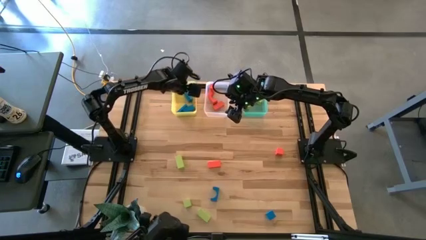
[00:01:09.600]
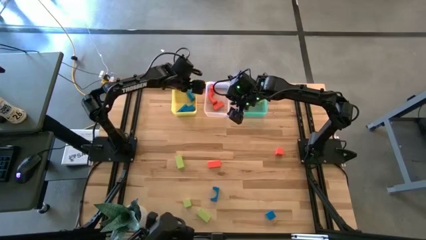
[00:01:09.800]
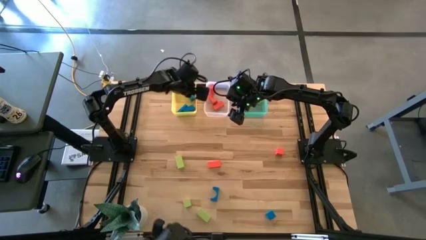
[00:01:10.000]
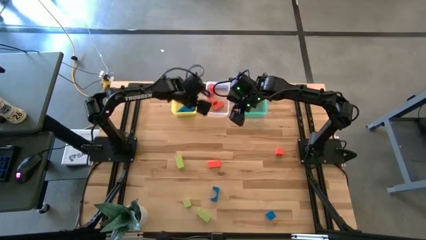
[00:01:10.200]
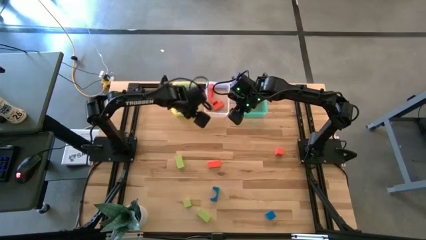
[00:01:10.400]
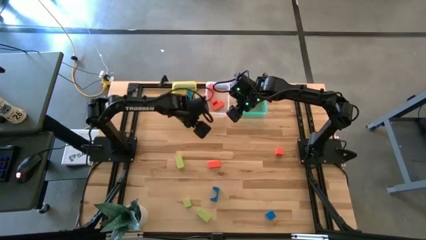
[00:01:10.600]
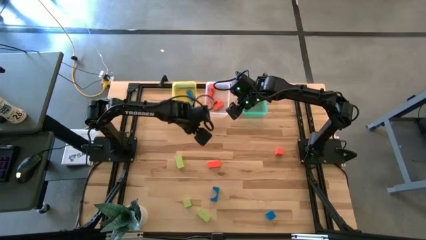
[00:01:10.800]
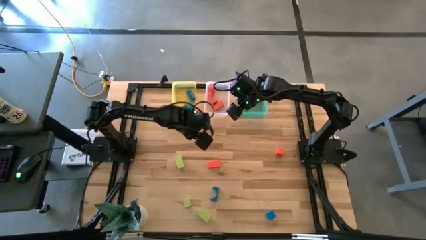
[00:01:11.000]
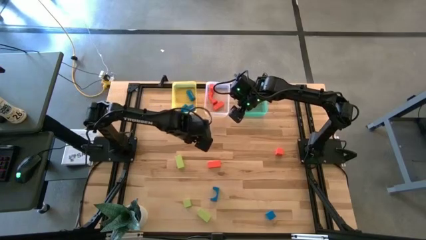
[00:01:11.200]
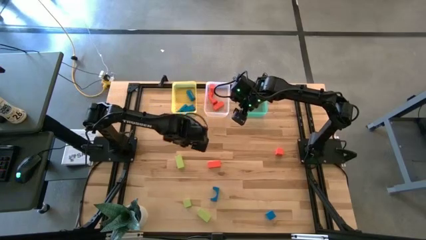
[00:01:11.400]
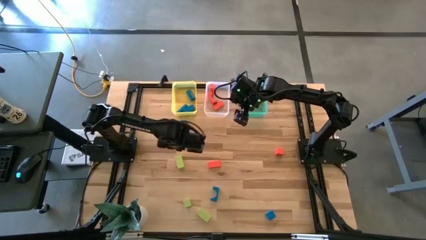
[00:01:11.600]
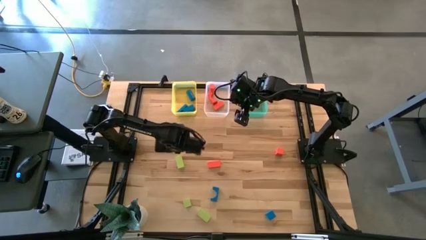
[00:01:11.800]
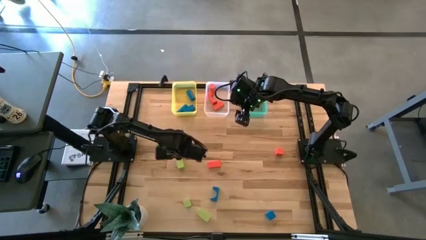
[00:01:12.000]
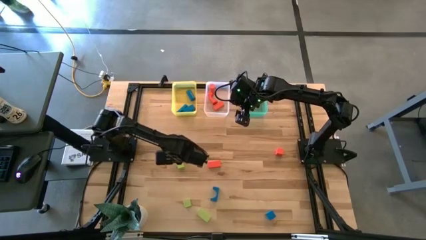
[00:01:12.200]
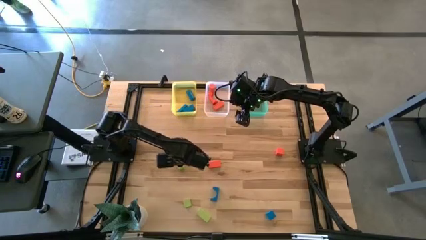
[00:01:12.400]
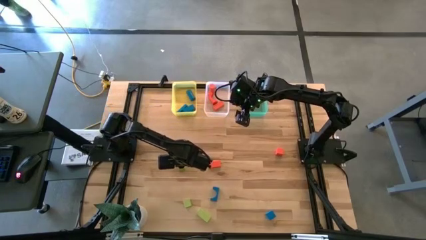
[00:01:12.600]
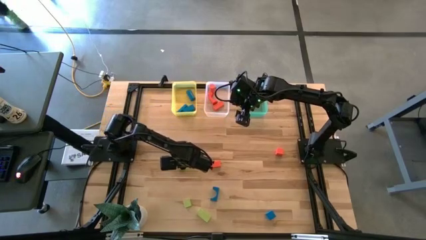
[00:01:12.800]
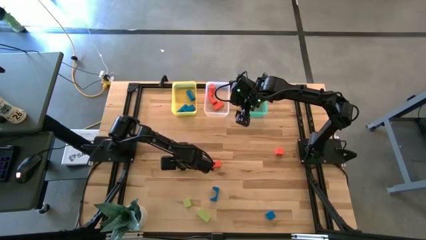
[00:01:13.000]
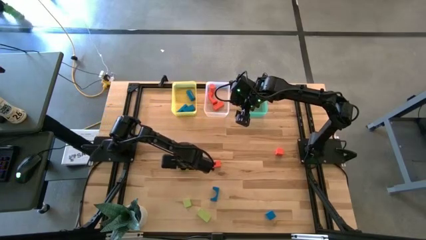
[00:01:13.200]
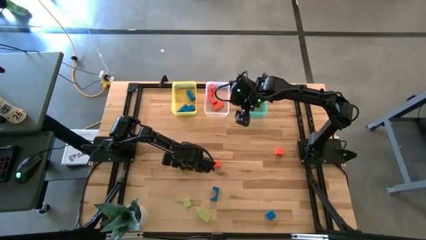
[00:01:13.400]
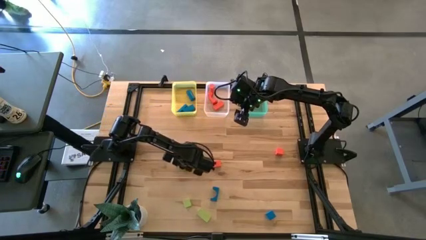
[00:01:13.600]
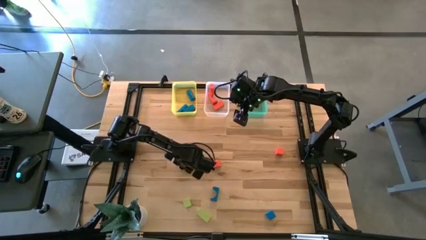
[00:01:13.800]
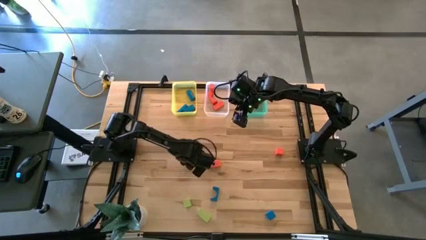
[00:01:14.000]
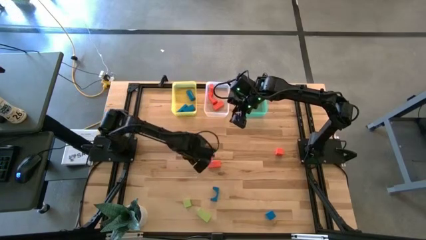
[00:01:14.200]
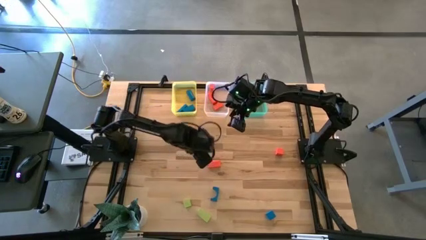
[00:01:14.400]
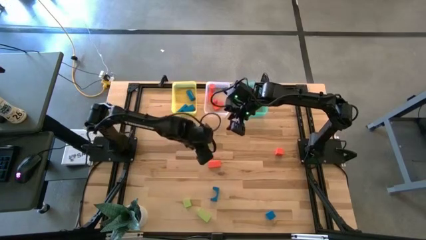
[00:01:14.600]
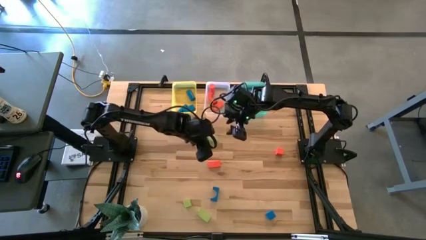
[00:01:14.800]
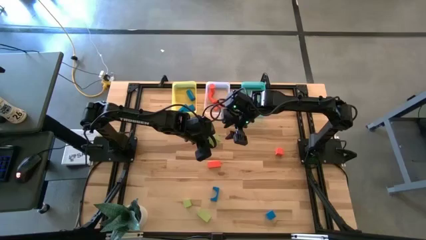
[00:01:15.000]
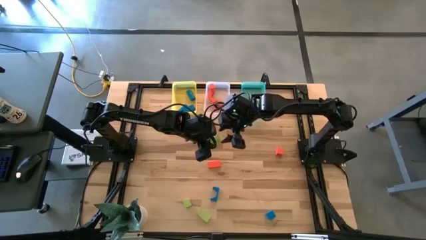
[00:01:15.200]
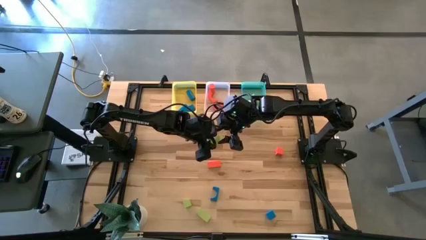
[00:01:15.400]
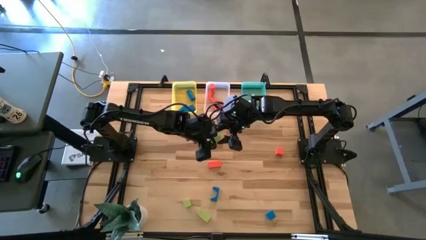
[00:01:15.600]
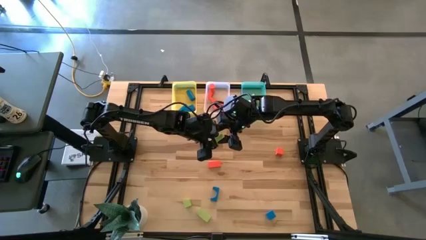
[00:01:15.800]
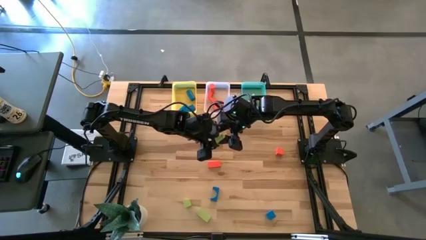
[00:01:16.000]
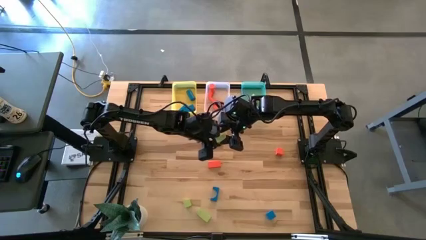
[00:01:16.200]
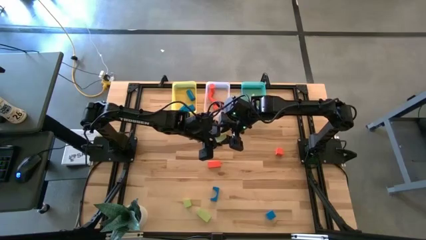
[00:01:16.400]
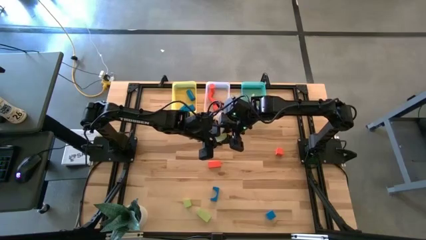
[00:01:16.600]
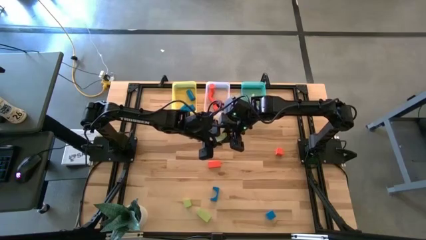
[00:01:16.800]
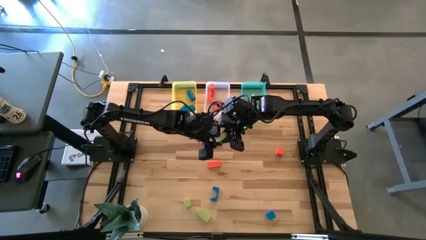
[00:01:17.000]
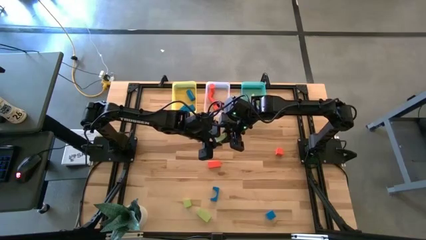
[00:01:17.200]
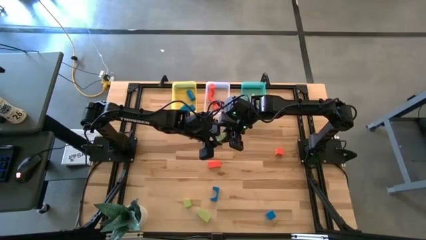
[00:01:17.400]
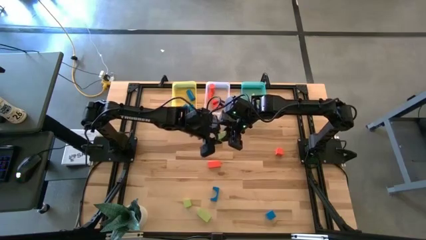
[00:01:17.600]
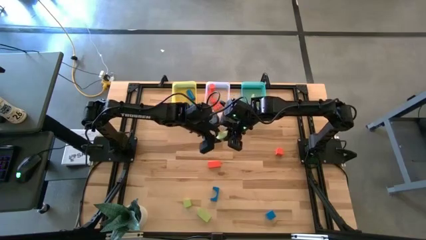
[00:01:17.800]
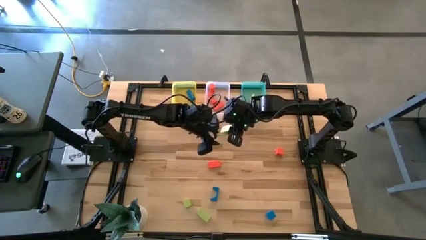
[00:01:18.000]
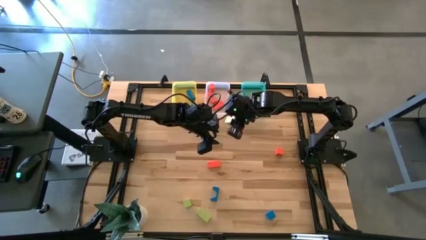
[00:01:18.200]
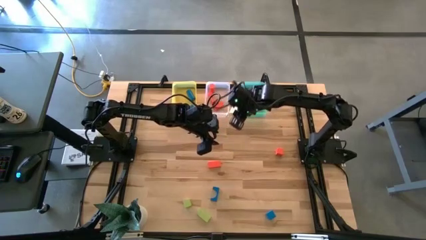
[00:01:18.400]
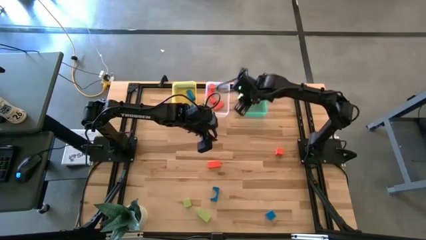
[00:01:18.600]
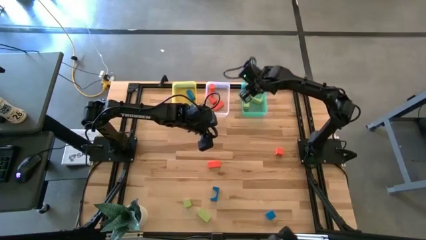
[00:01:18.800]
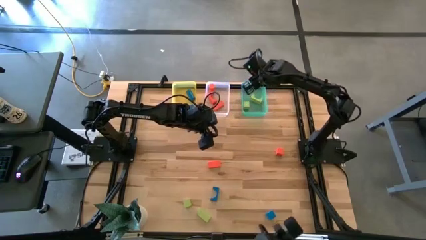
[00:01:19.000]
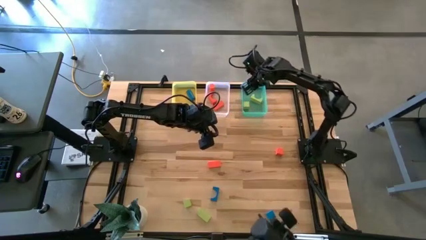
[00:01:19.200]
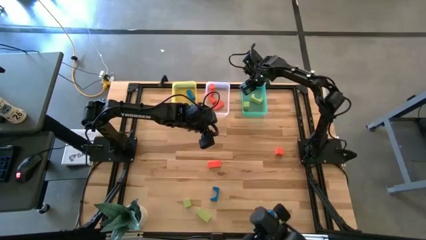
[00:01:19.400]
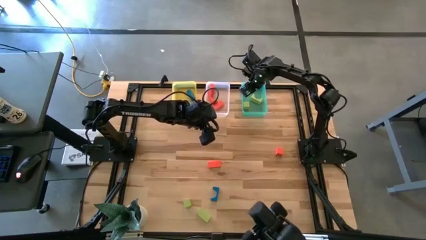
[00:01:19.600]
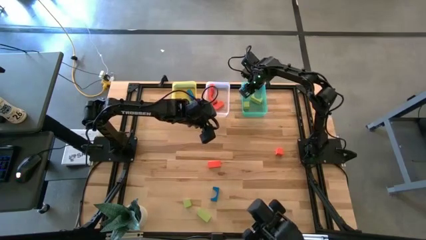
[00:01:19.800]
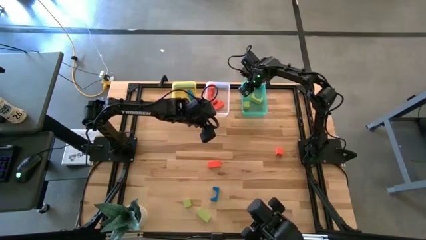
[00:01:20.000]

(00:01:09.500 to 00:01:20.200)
Task: Sort & place blocks by color
Put the green block into the blue bin

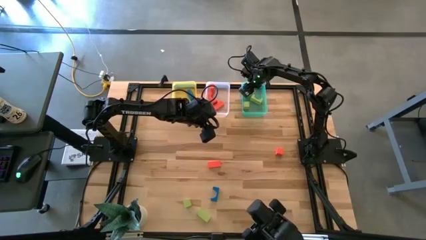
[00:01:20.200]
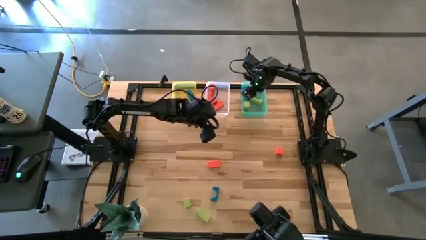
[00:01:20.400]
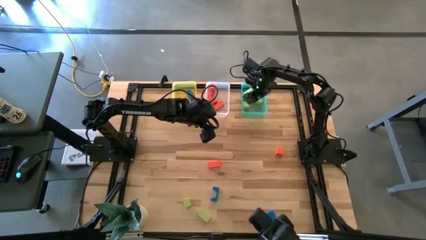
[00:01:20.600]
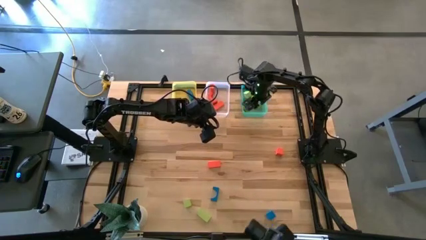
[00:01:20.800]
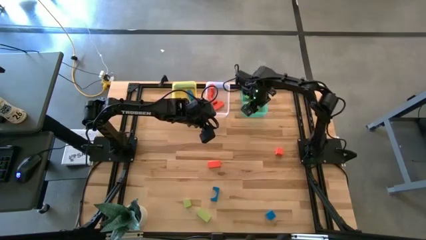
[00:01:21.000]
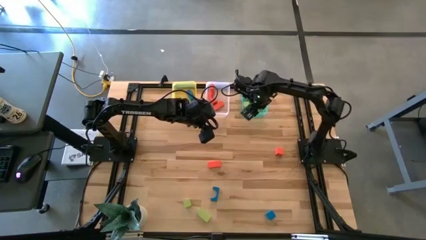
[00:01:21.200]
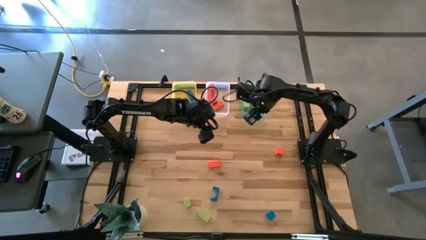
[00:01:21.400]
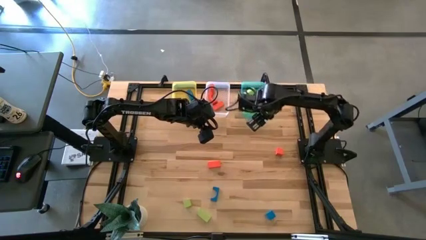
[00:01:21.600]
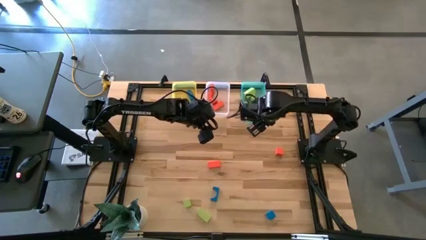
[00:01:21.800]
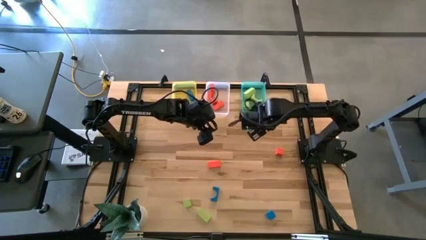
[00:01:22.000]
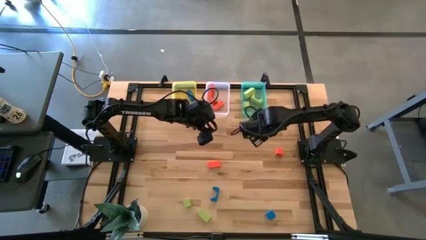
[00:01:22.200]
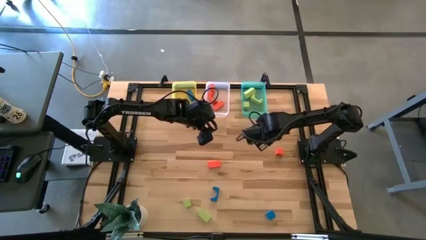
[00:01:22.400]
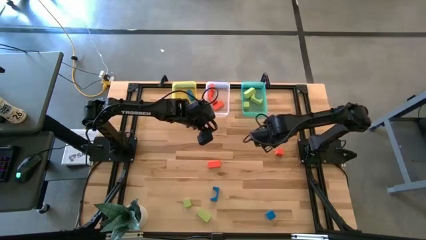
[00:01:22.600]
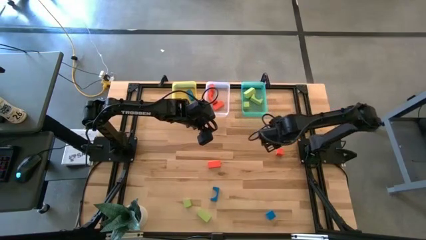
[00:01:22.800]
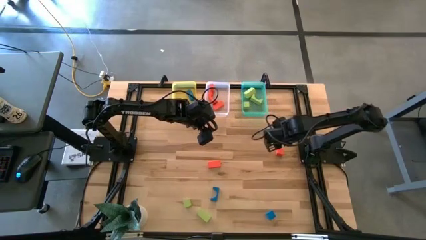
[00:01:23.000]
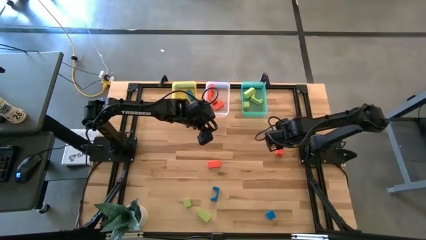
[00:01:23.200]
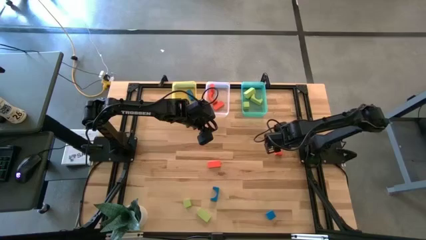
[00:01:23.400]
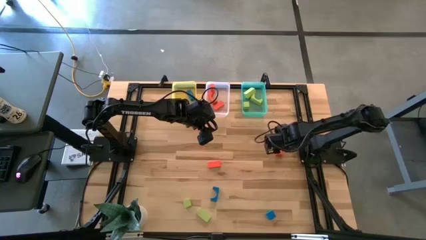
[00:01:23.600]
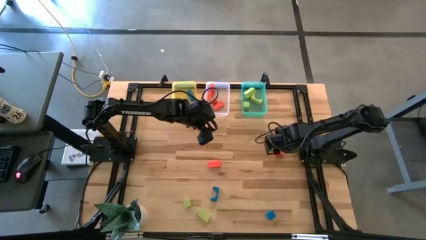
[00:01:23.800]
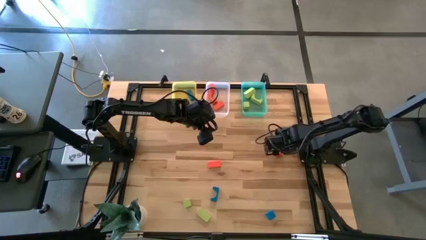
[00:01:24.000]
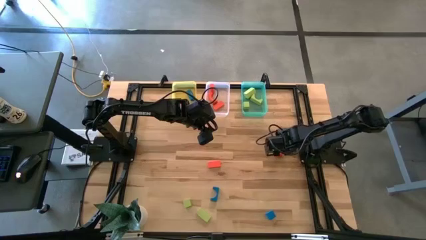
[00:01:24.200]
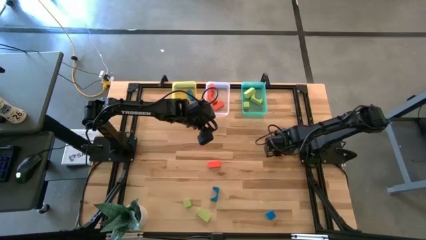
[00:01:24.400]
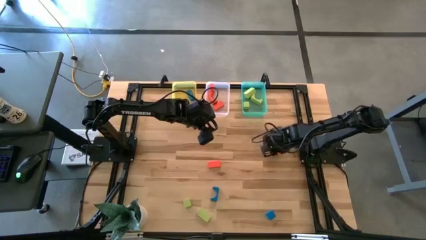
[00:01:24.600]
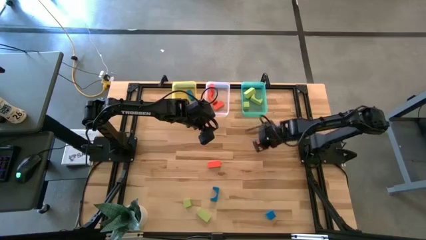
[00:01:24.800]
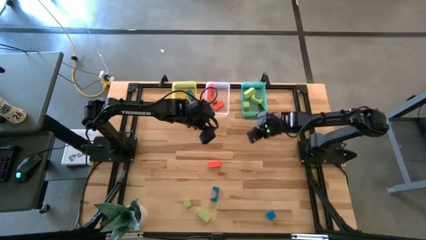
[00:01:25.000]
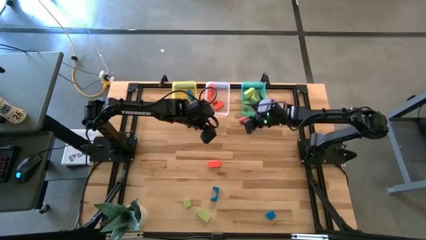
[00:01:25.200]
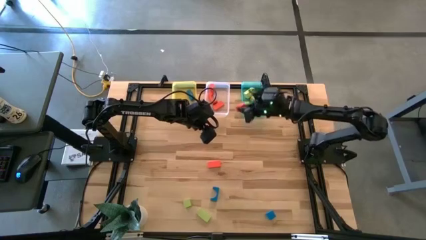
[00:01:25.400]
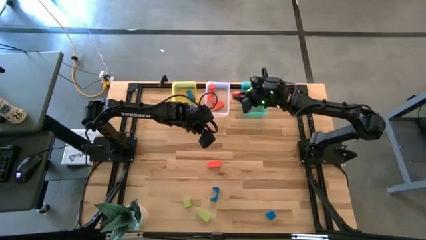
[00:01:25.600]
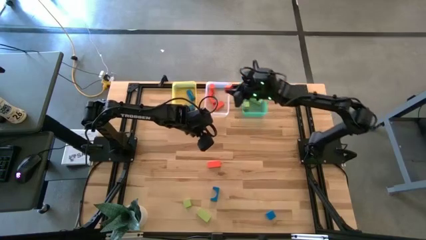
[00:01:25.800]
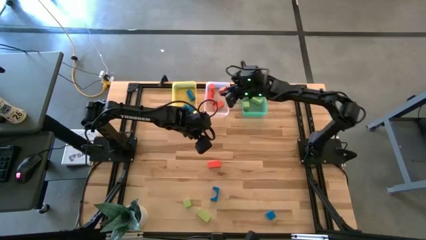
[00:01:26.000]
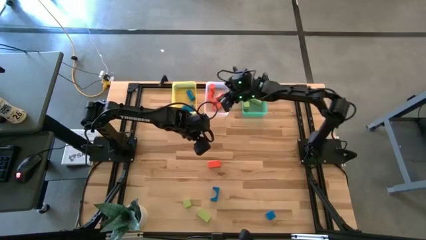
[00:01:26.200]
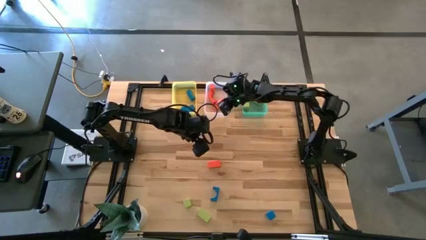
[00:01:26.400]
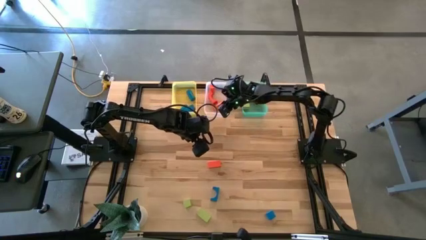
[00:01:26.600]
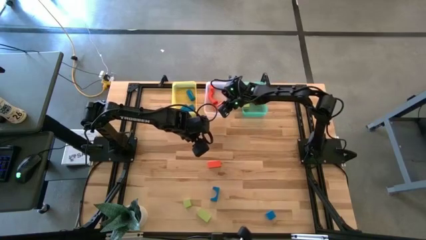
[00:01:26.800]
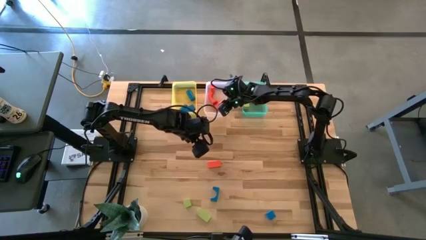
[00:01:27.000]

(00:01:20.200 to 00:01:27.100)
Put the orange block into the transparent bin
